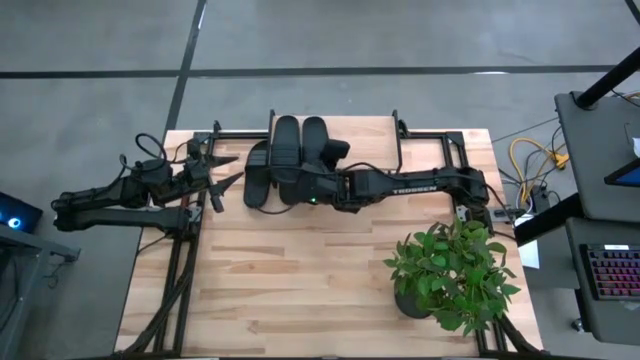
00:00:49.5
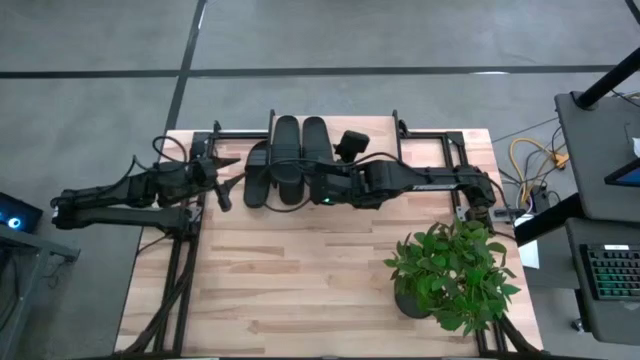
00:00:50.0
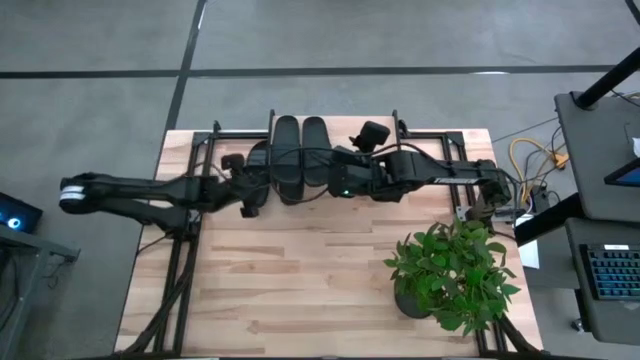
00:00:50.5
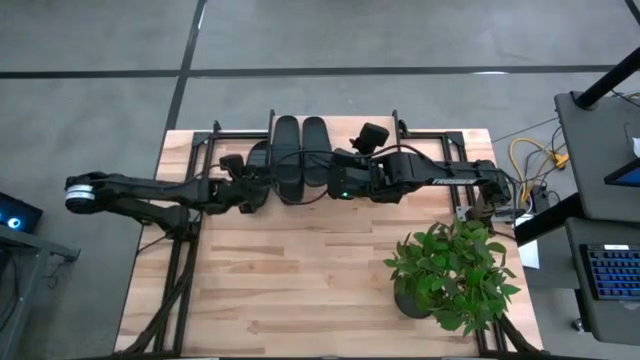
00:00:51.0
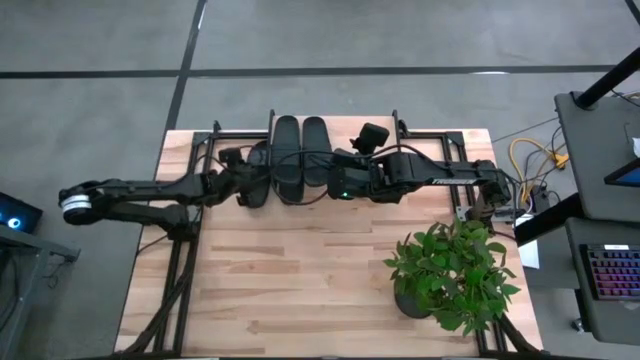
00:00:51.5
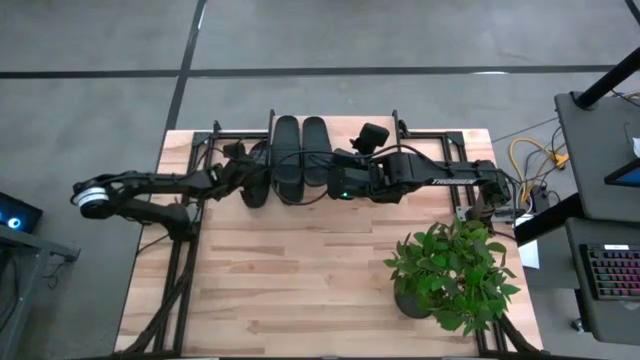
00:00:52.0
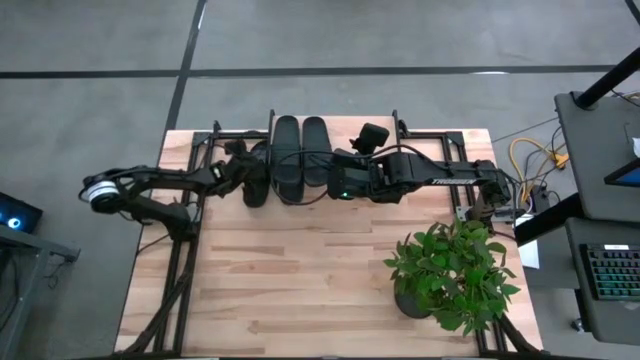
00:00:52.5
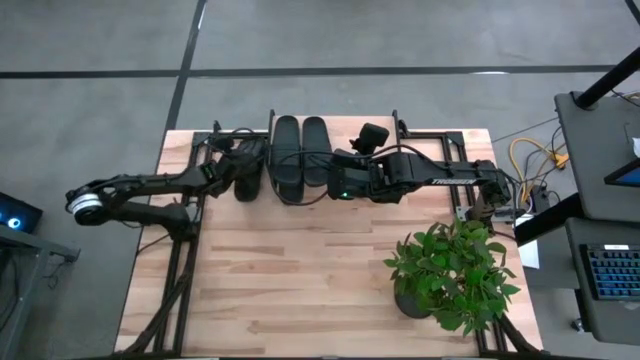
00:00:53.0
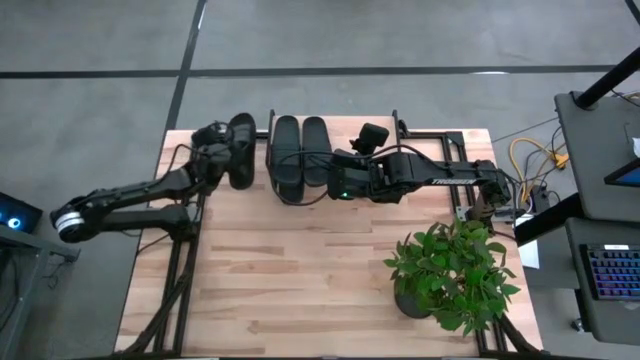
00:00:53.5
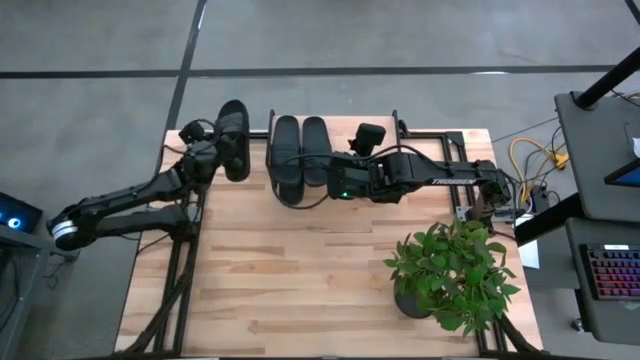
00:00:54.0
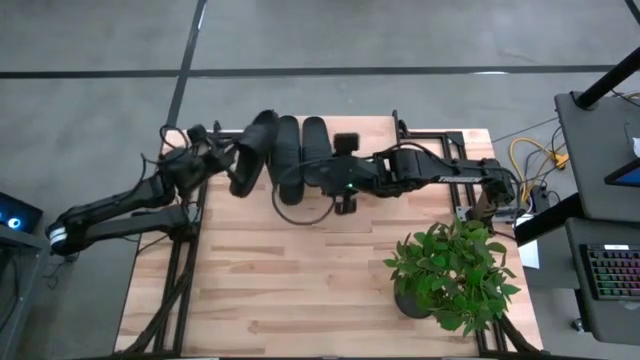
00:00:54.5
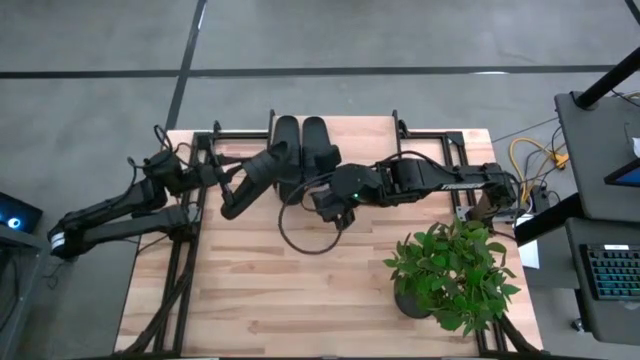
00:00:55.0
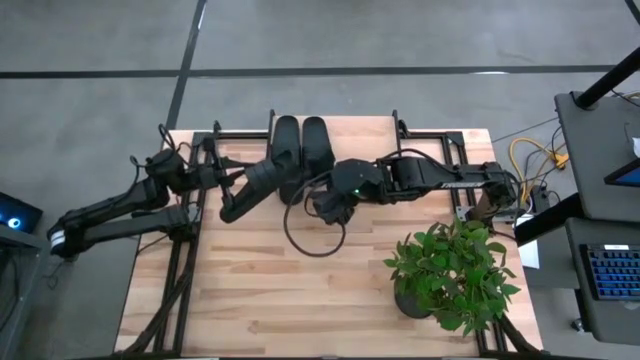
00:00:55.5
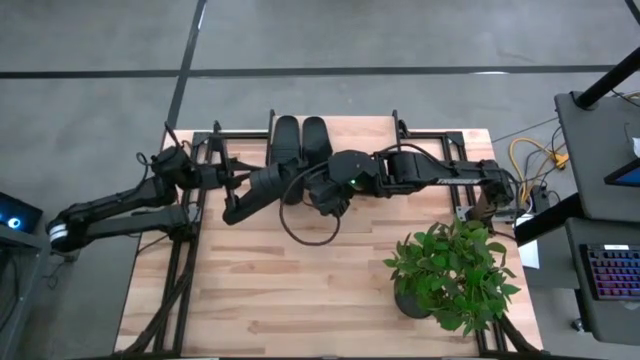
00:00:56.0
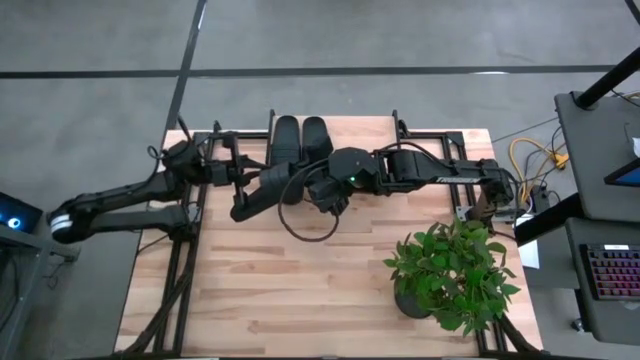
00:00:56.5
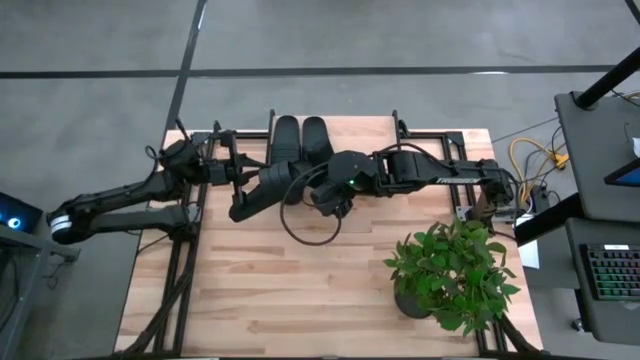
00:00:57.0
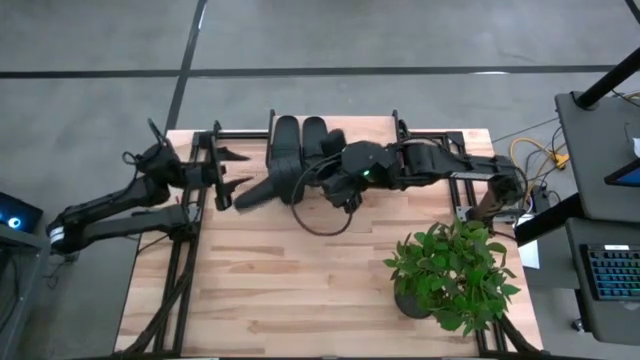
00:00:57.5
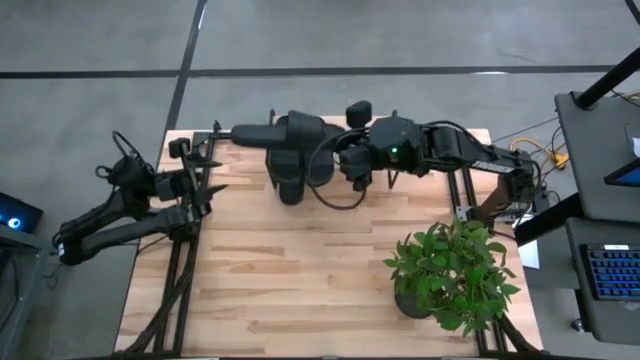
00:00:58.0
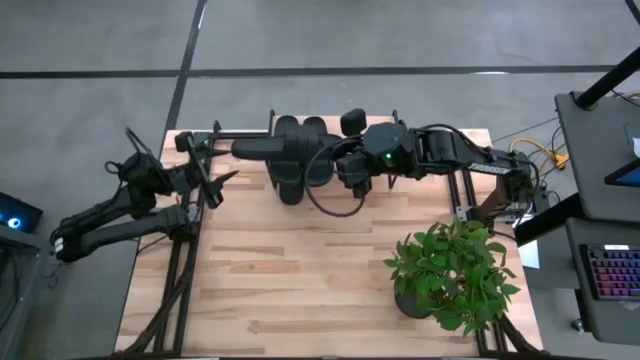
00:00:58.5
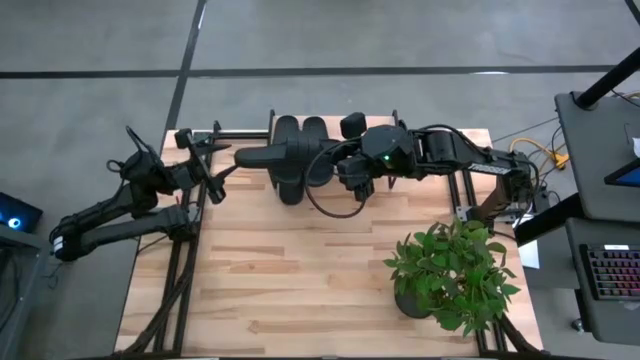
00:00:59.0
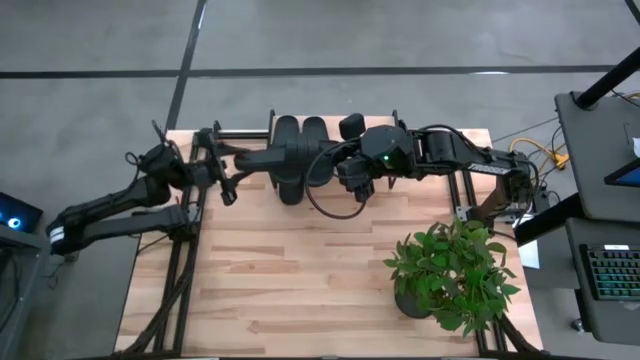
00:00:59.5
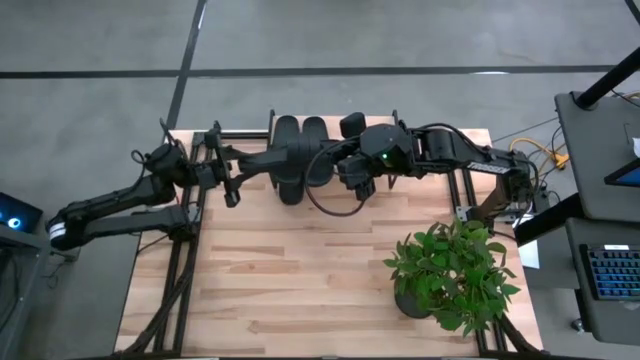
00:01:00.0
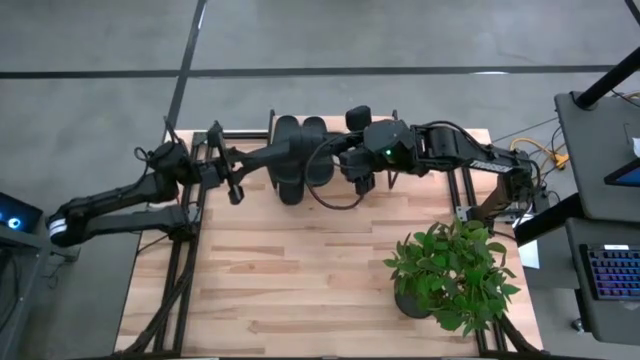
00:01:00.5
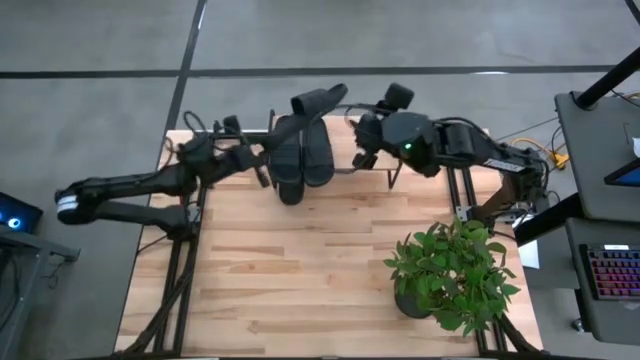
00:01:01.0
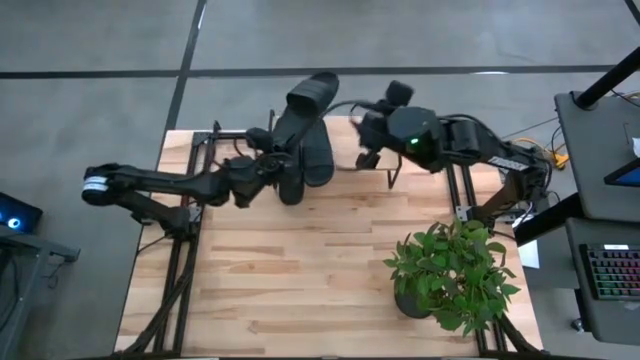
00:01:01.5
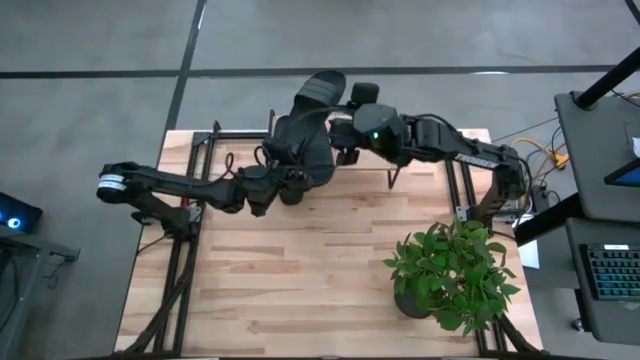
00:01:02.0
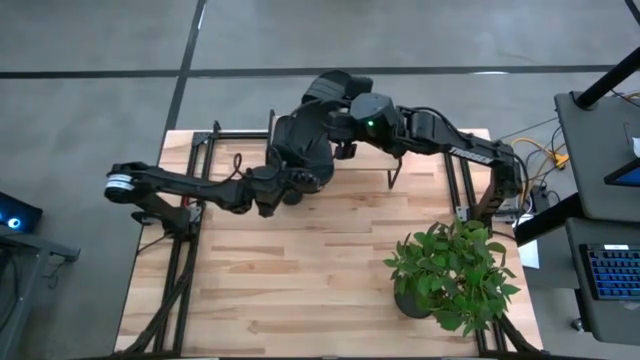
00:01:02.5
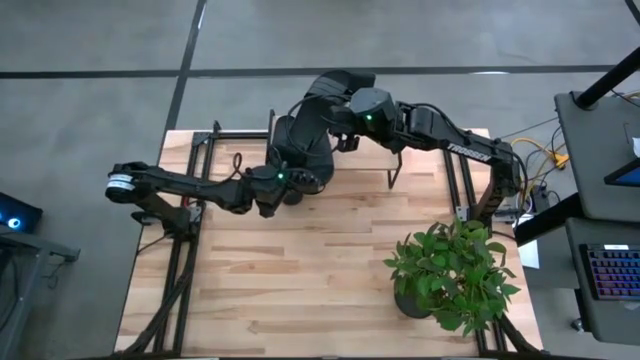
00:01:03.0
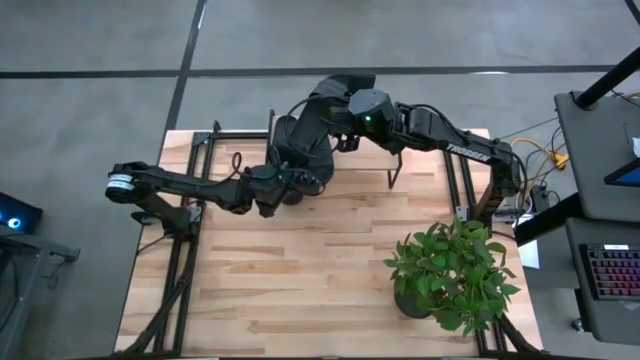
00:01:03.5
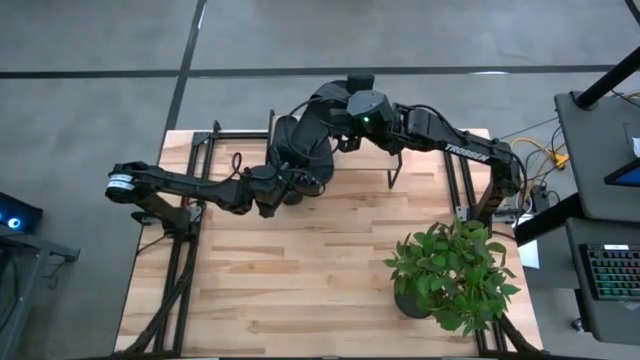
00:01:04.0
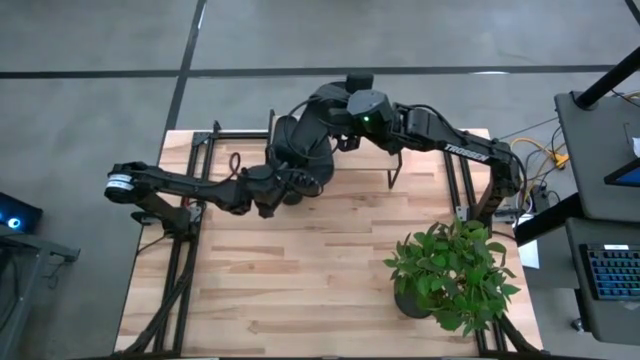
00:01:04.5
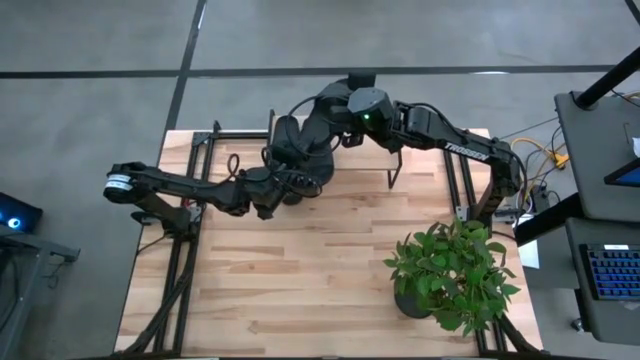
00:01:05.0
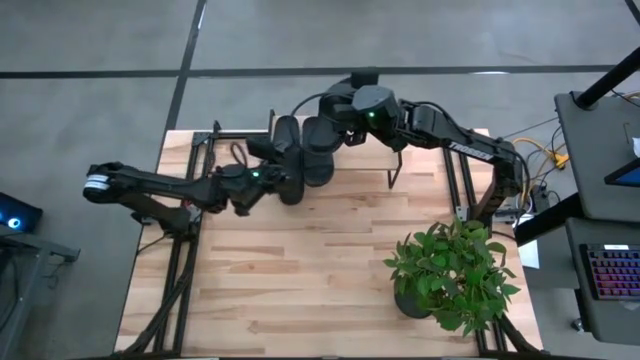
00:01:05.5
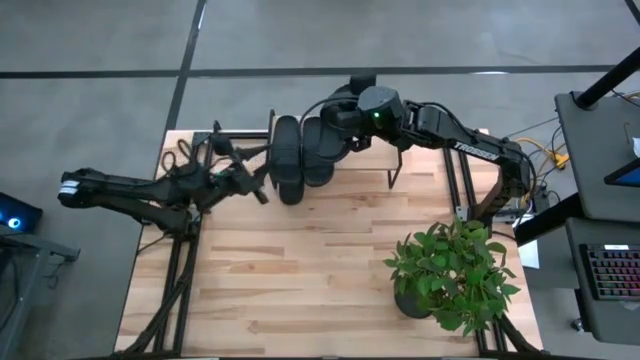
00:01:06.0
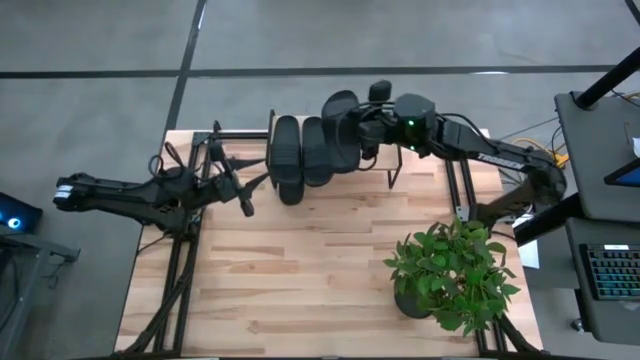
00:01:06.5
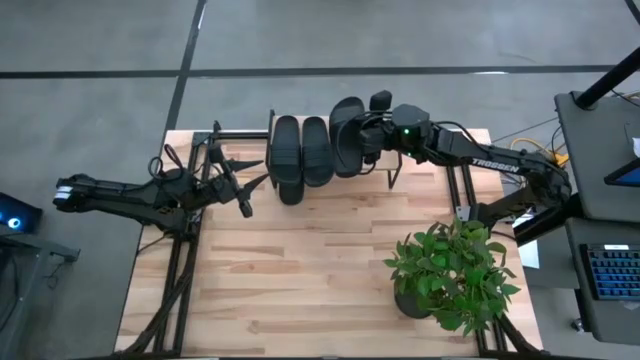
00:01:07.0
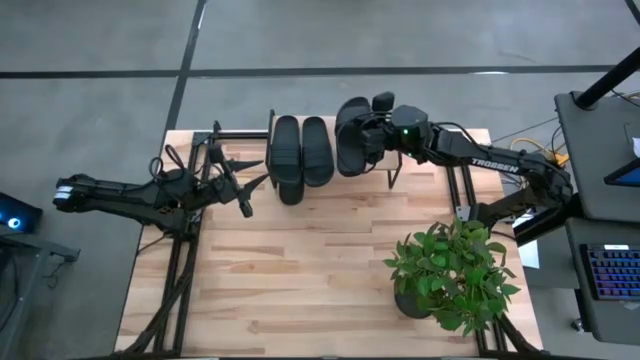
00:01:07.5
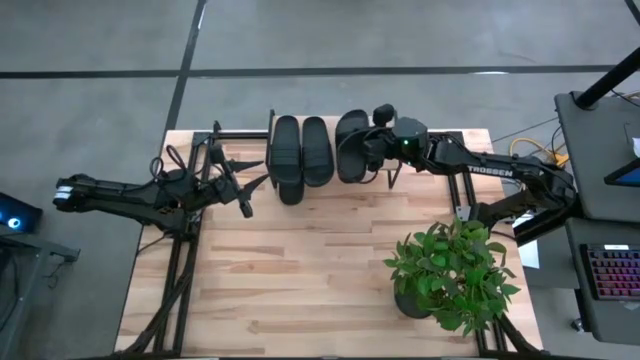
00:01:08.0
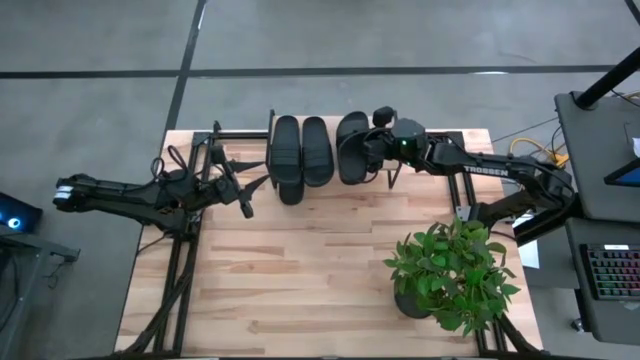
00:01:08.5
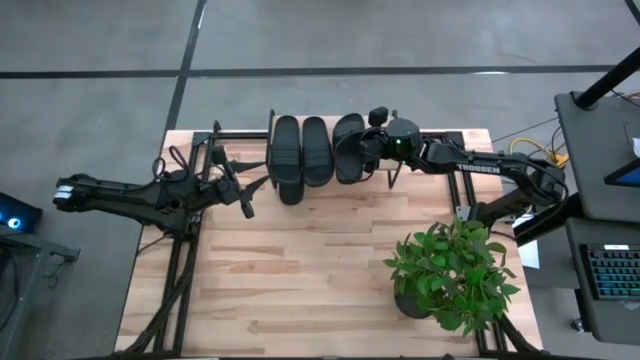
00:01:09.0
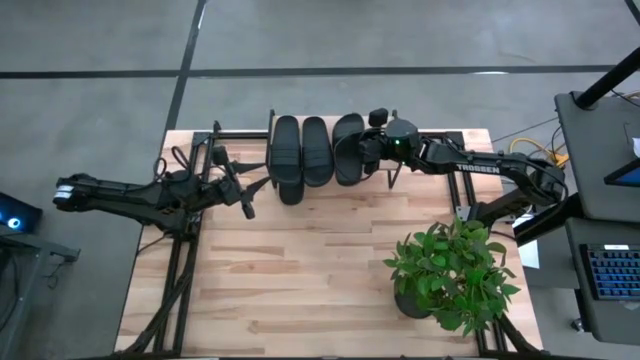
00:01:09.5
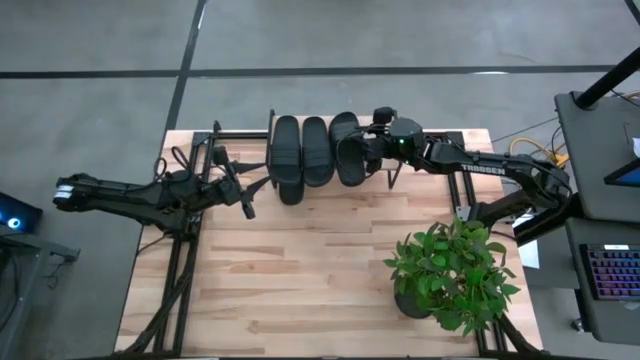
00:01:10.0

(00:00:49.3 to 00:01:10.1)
Task: Pick and place slides into the shelf
Put the black slipper on the shelf
